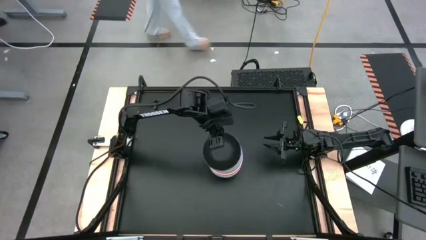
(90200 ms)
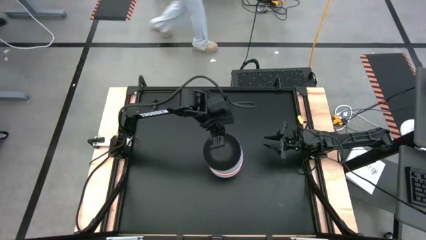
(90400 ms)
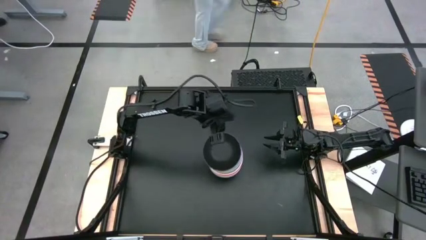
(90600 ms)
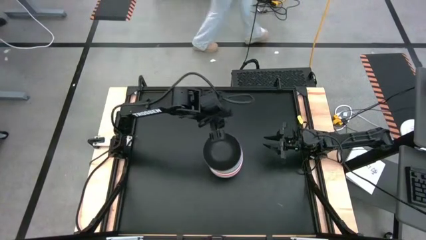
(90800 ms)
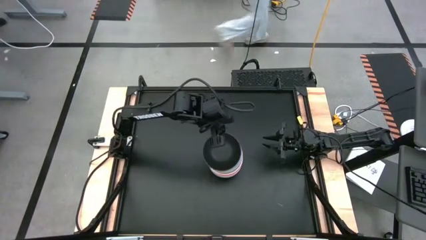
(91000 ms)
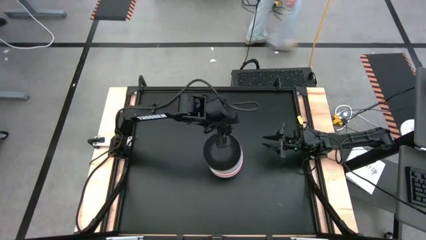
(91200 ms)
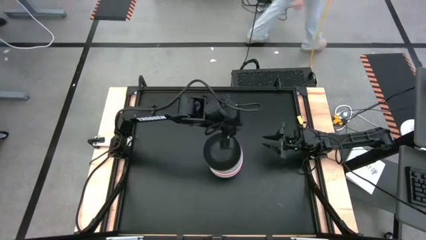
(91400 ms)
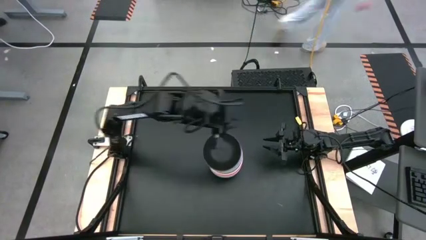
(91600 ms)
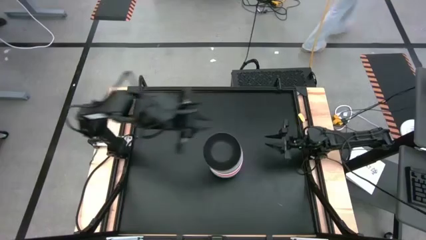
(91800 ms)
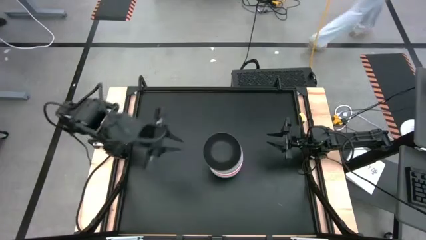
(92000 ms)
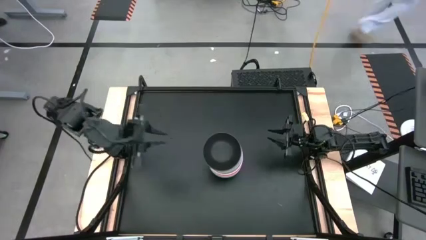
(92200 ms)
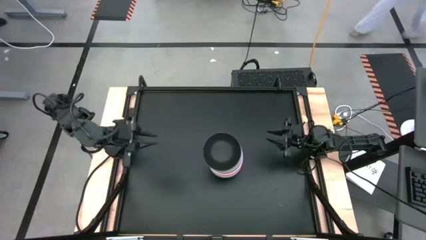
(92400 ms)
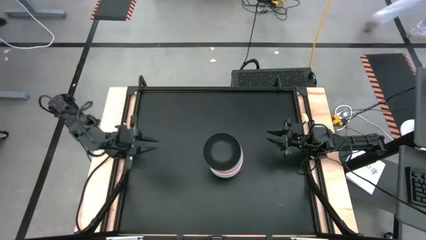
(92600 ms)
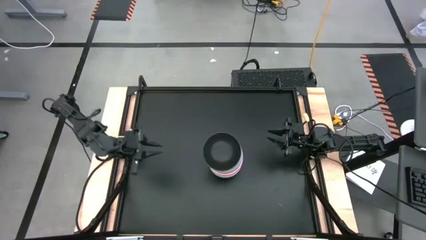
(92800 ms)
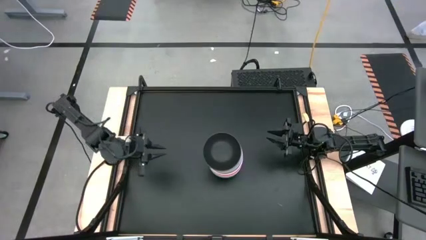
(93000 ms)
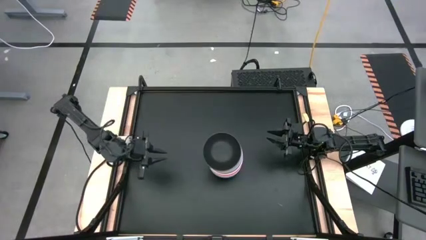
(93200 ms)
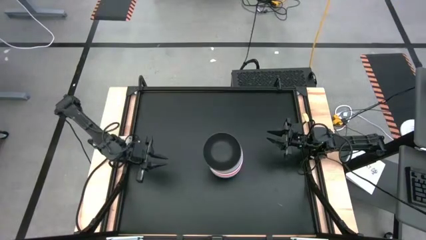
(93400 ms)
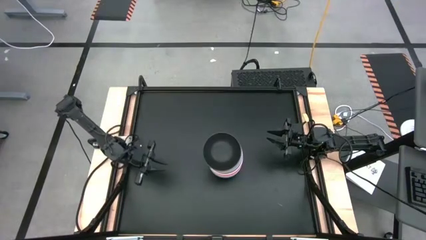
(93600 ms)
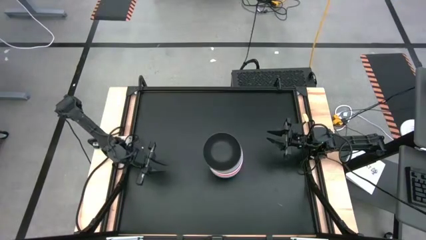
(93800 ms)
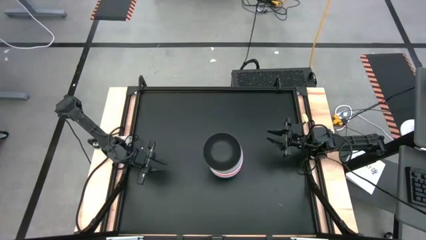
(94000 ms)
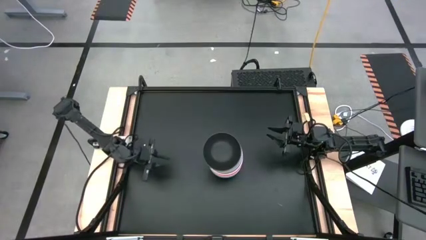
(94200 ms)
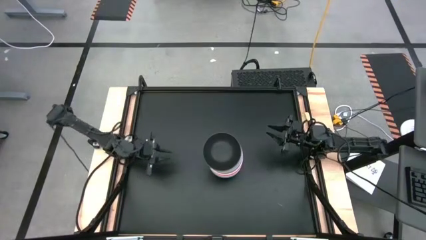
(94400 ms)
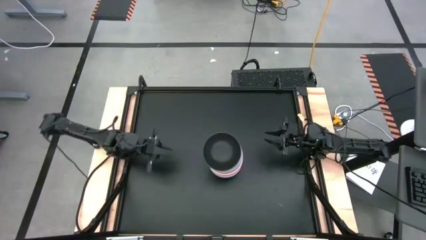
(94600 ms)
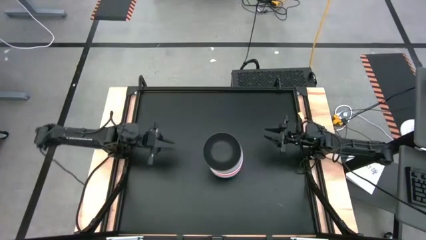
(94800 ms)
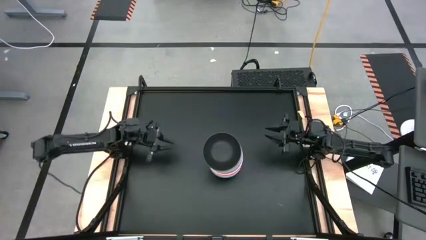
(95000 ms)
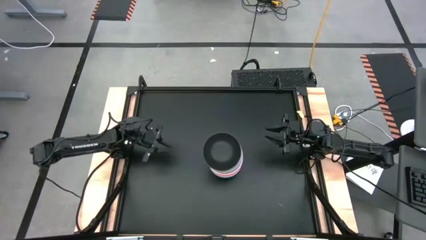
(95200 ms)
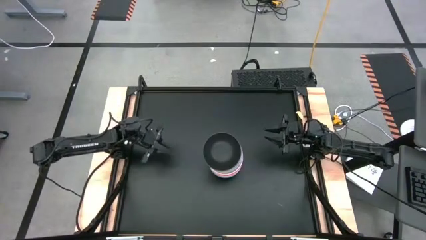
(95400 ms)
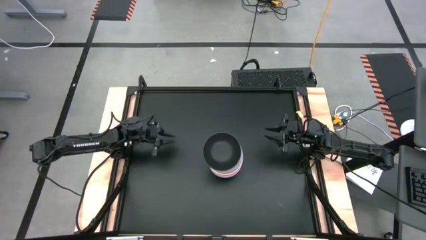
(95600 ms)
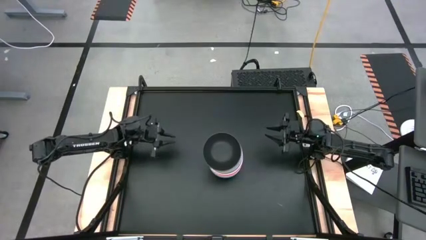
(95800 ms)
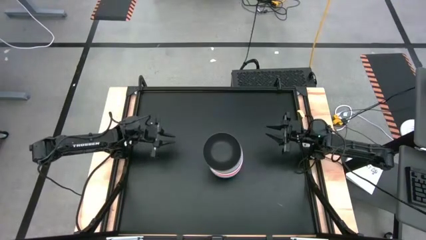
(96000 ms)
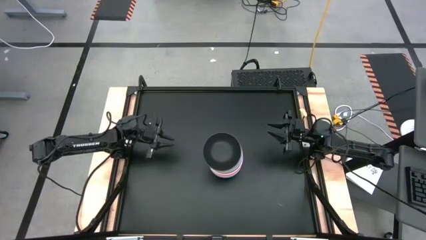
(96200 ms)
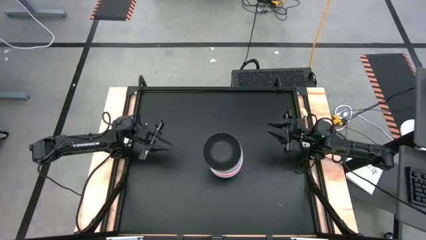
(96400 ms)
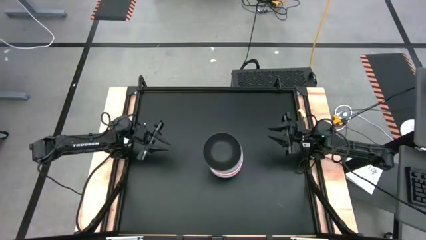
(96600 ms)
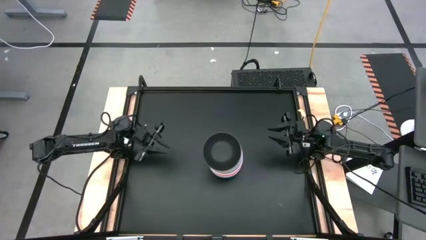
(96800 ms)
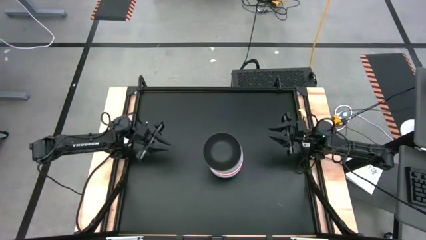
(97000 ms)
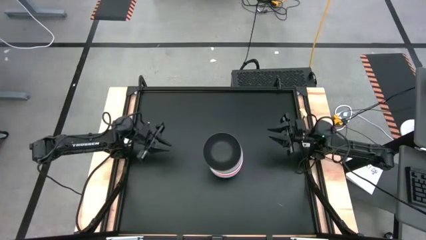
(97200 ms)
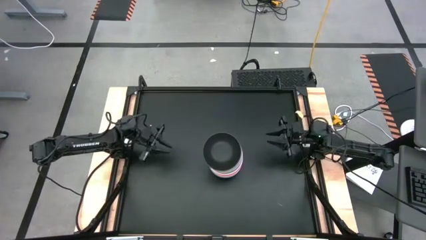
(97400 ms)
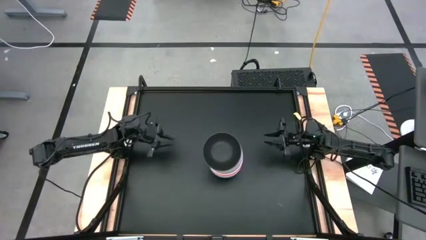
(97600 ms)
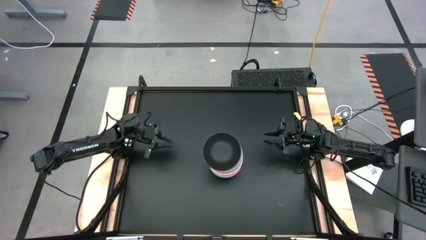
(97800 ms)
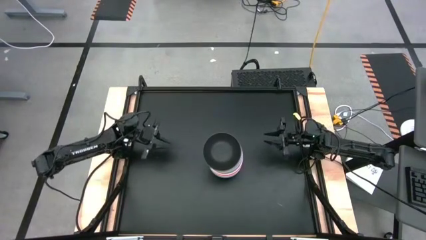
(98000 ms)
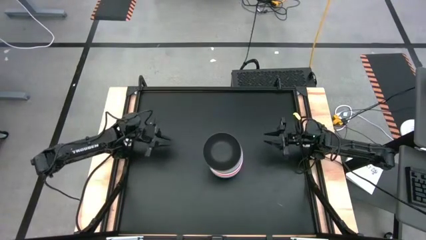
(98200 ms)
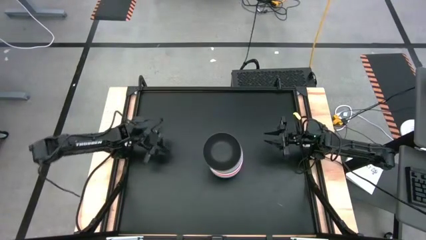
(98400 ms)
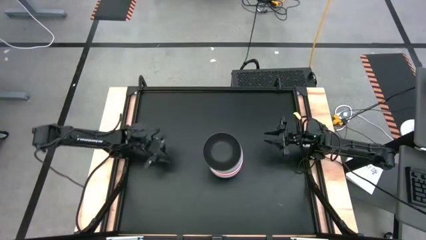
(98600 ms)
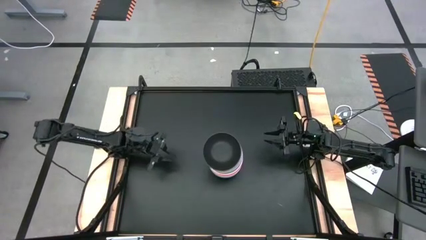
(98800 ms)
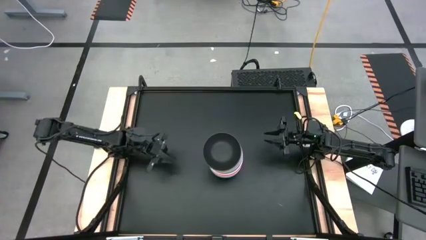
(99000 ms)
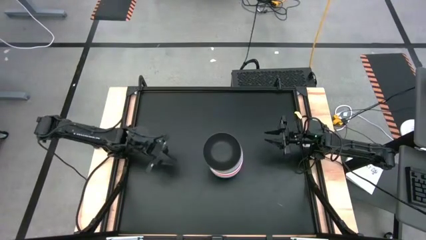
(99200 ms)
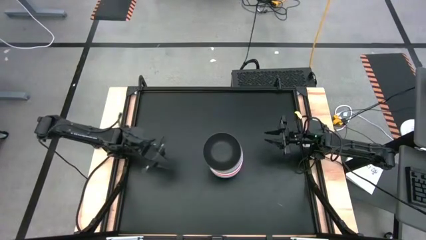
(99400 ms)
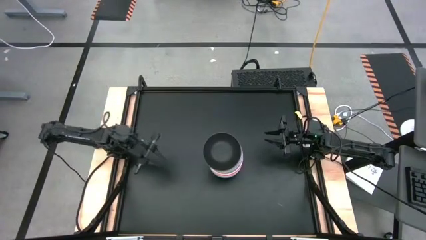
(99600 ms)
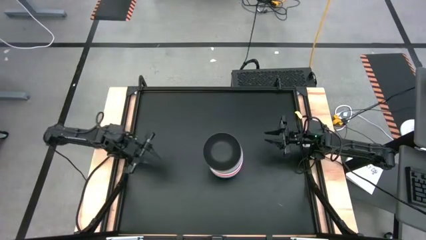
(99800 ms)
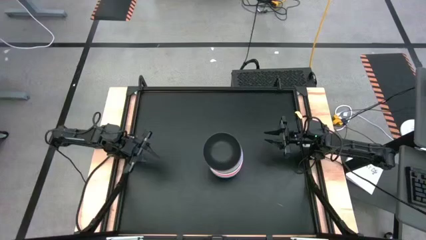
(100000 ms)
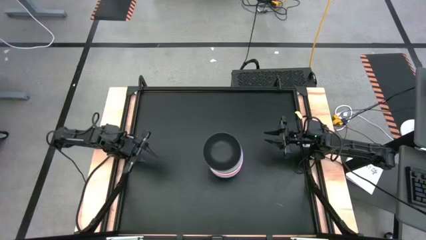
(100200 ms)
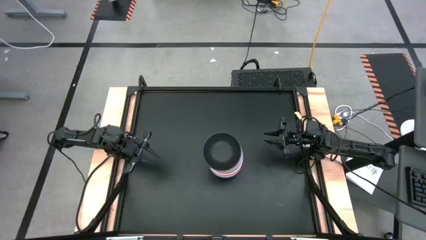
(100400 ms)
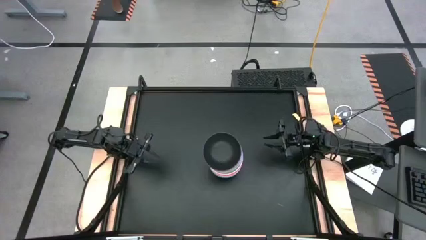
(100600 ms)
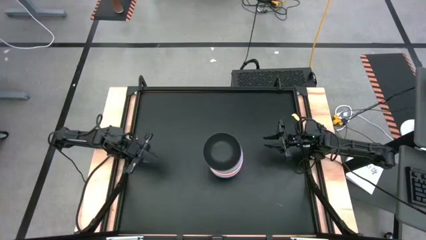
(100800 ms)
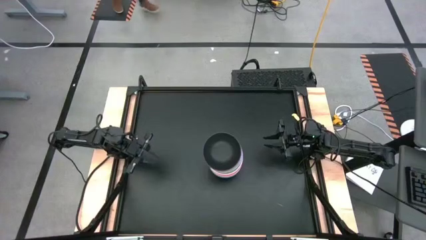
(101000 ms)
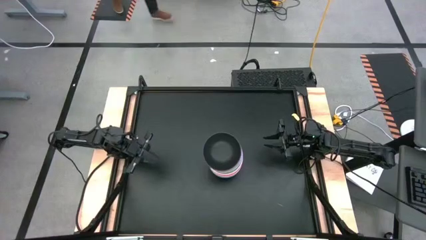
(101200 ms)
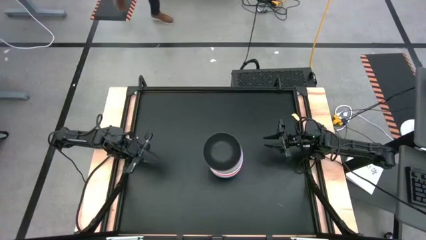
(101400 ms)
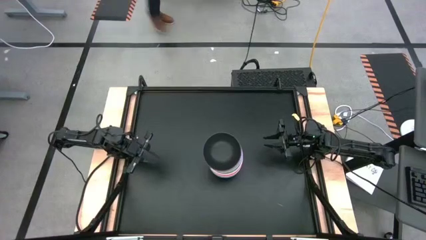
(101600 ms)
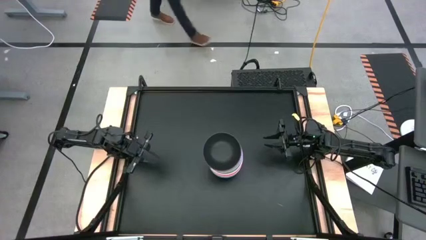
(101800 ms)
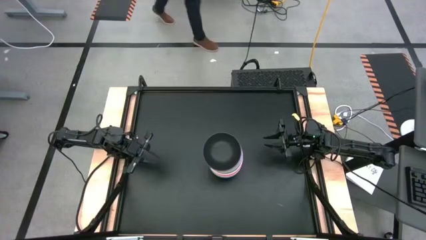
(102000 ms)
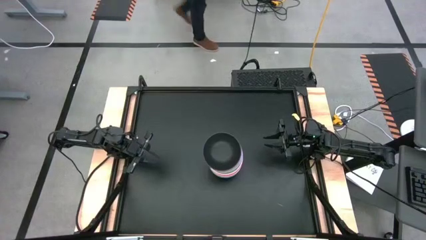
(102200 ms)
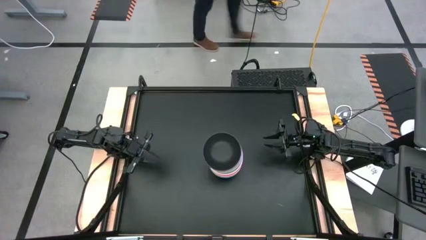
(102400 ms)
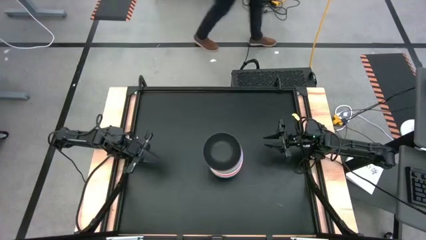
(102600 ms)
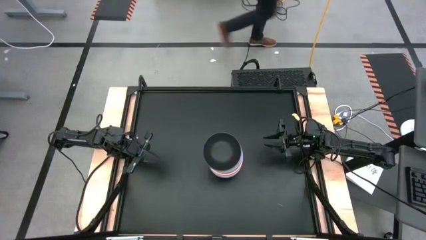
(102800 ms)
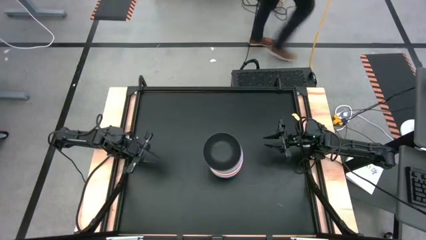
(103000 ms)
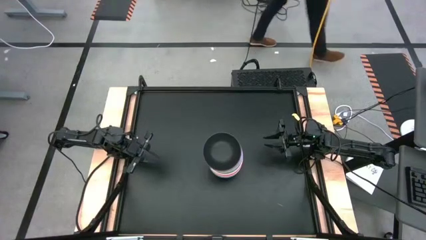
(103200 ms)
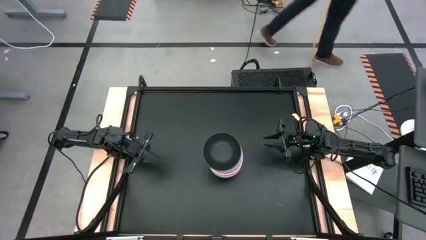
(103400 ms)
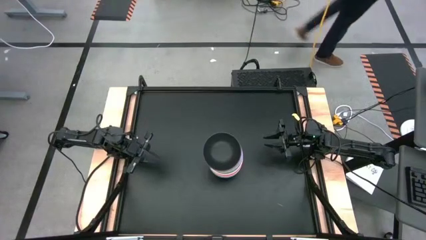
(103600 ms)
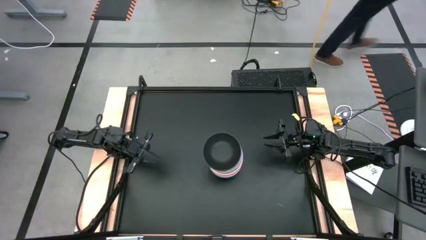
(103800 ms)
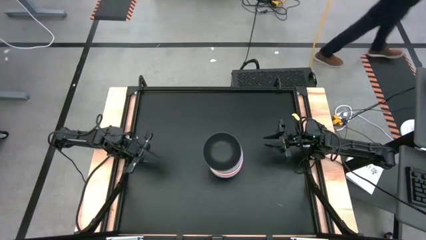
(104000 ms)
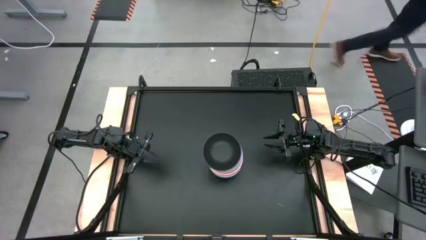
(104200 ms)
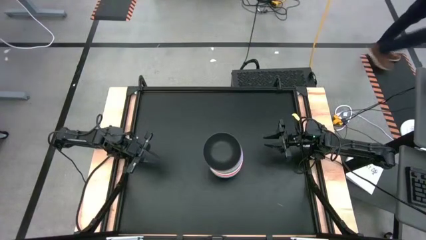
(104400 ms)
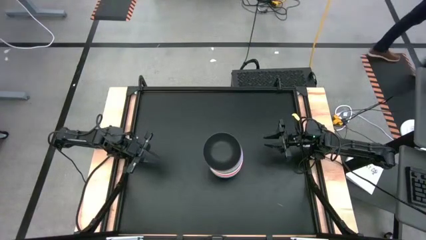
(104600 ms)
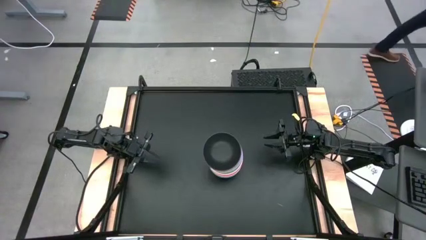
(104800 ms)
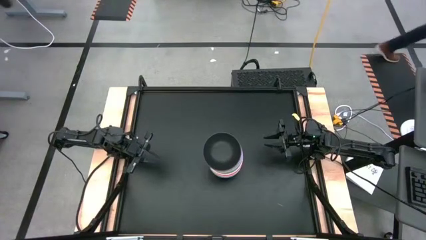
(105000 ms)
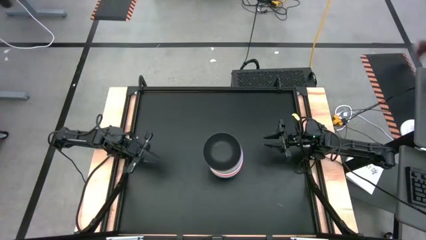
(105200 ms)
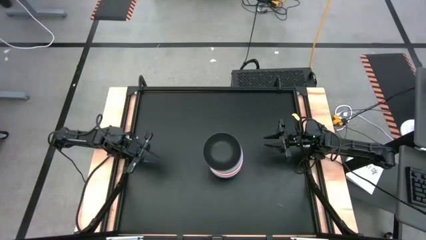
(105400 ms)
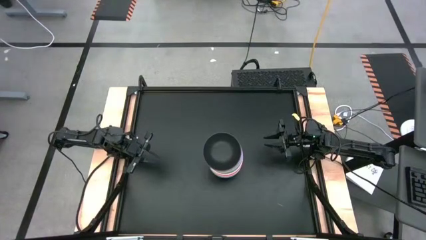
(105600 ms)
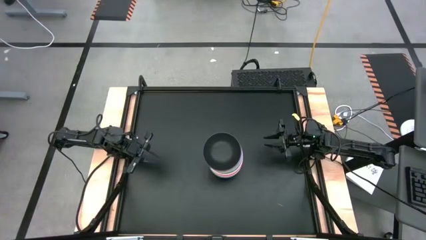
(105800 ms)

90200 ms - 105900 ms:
Task: Nest bowls inside each other
Return to Home Position
